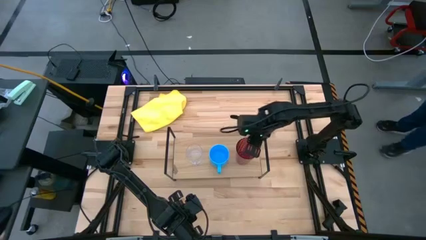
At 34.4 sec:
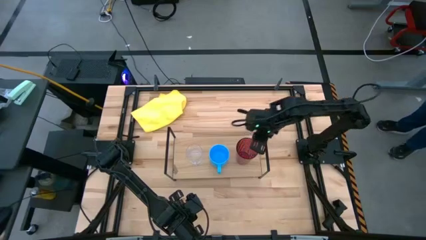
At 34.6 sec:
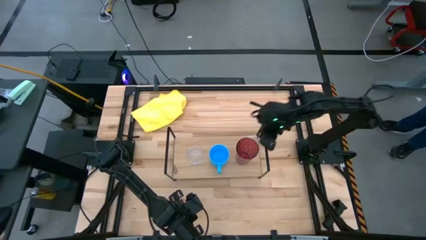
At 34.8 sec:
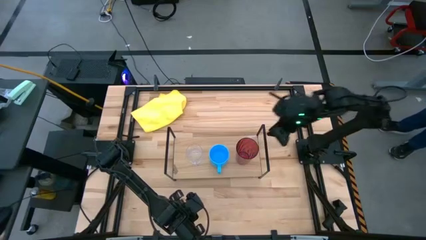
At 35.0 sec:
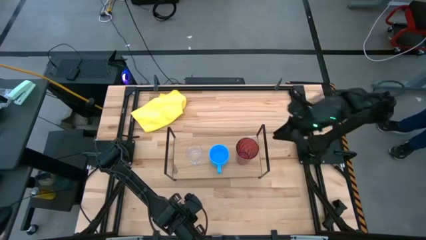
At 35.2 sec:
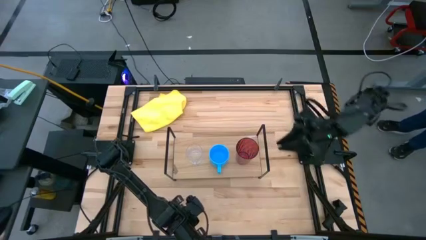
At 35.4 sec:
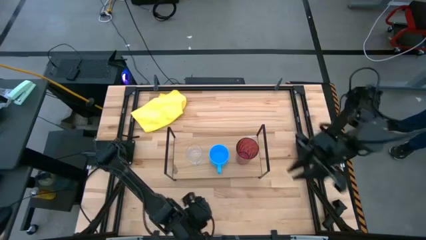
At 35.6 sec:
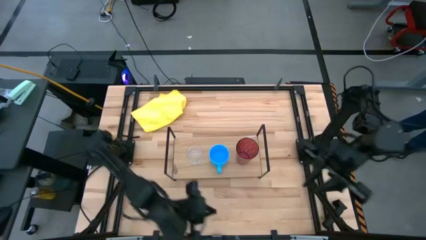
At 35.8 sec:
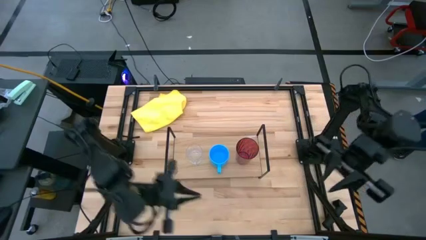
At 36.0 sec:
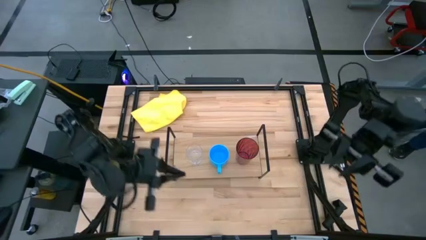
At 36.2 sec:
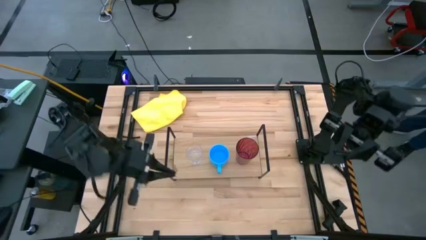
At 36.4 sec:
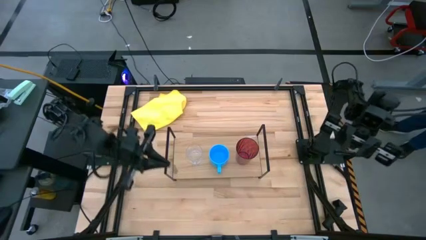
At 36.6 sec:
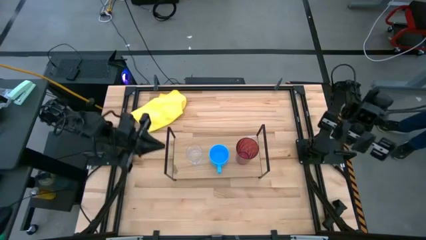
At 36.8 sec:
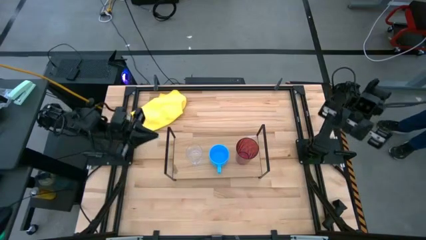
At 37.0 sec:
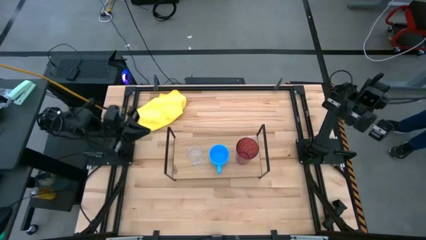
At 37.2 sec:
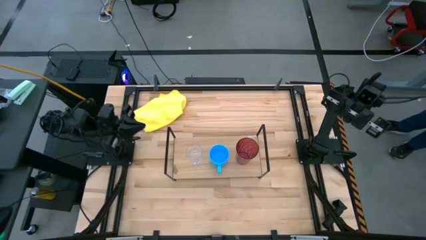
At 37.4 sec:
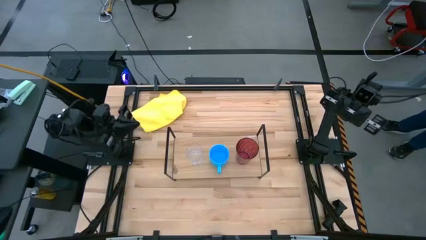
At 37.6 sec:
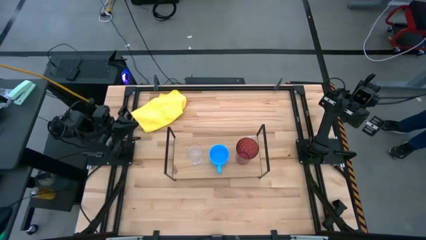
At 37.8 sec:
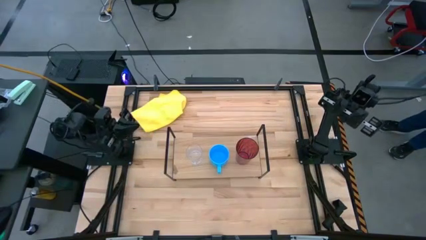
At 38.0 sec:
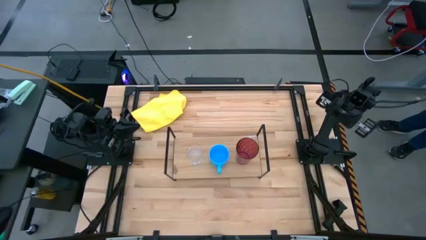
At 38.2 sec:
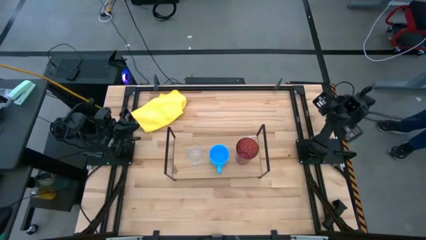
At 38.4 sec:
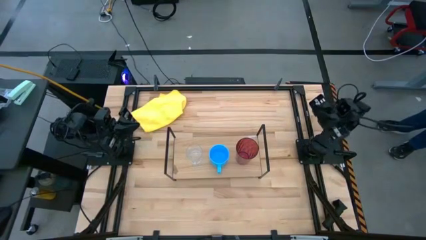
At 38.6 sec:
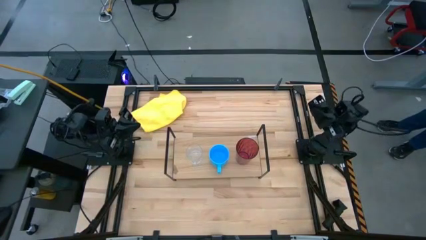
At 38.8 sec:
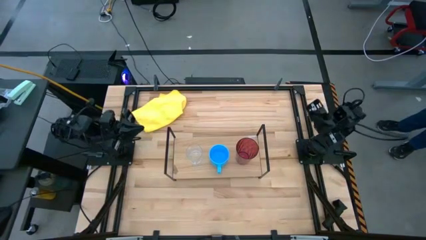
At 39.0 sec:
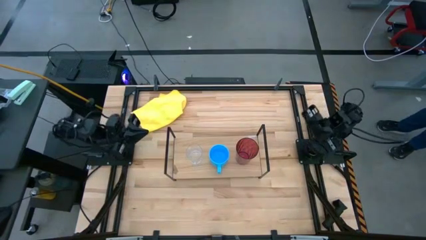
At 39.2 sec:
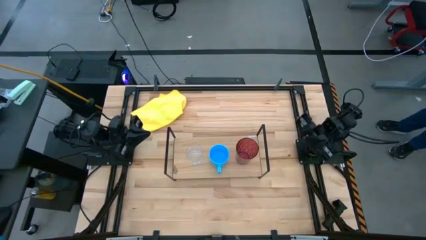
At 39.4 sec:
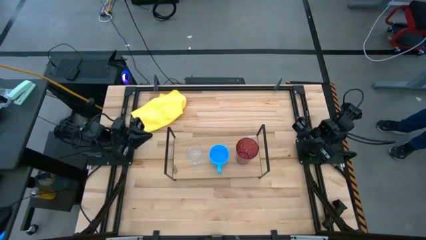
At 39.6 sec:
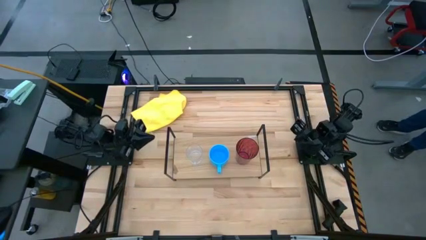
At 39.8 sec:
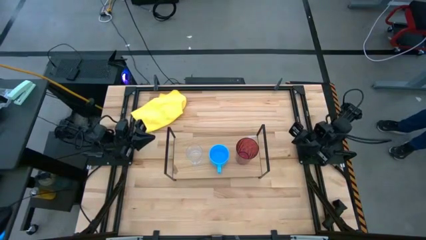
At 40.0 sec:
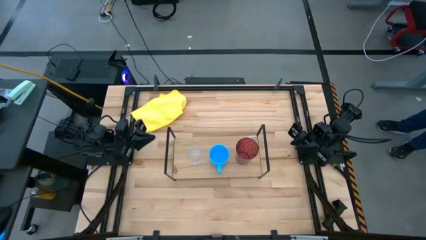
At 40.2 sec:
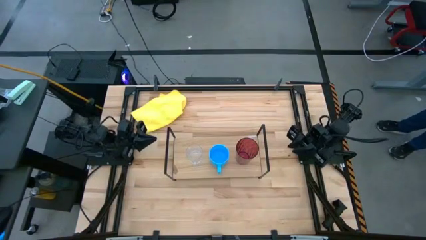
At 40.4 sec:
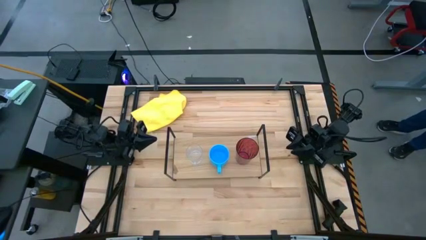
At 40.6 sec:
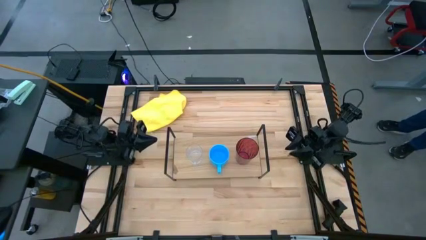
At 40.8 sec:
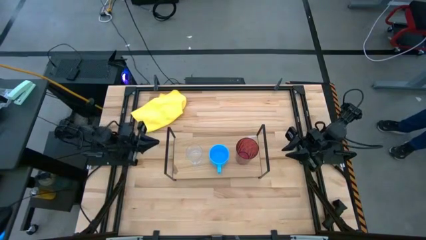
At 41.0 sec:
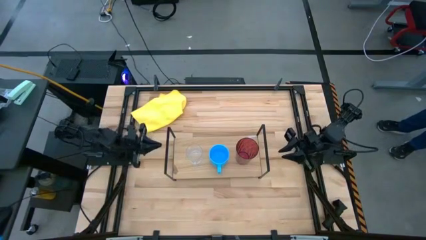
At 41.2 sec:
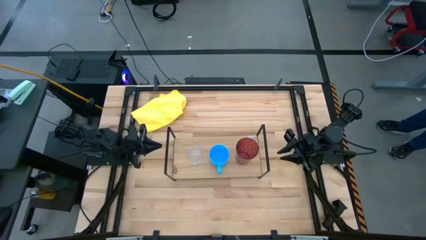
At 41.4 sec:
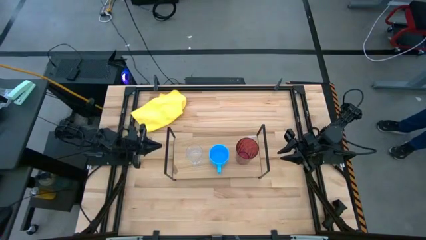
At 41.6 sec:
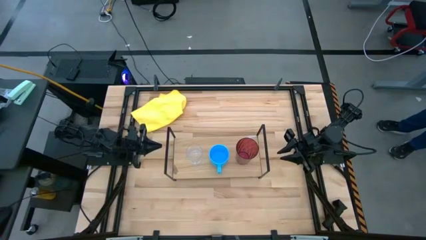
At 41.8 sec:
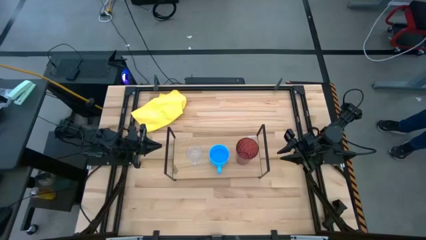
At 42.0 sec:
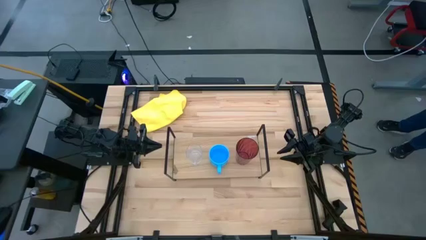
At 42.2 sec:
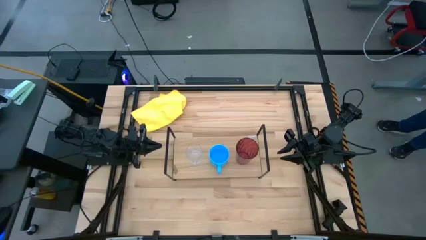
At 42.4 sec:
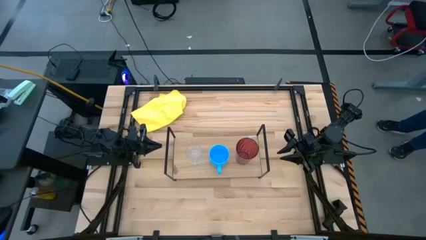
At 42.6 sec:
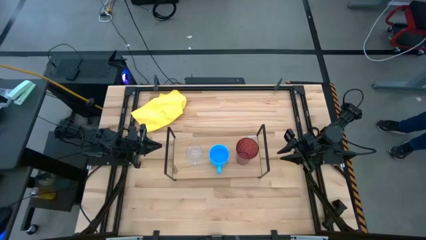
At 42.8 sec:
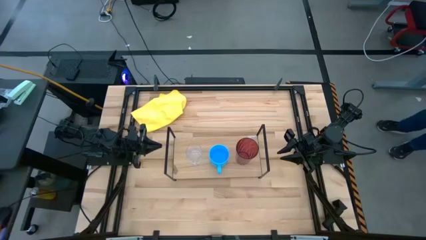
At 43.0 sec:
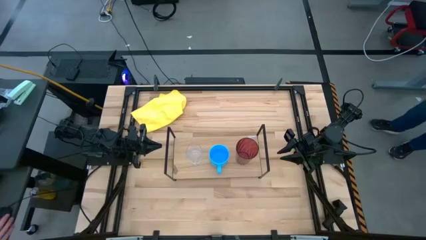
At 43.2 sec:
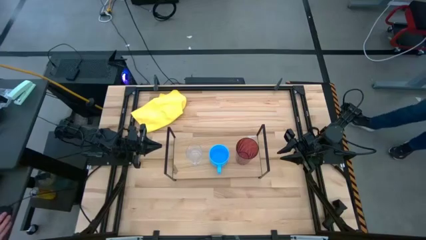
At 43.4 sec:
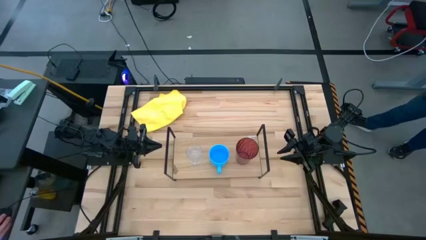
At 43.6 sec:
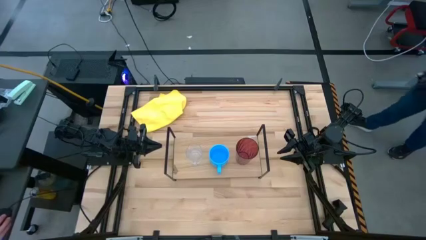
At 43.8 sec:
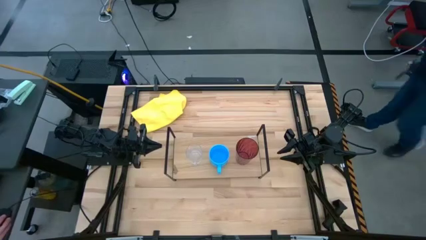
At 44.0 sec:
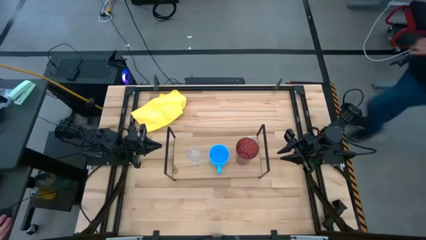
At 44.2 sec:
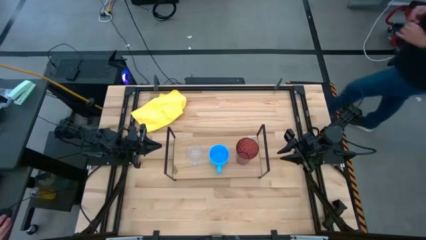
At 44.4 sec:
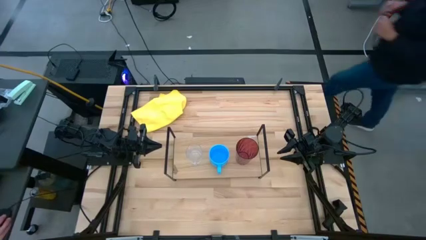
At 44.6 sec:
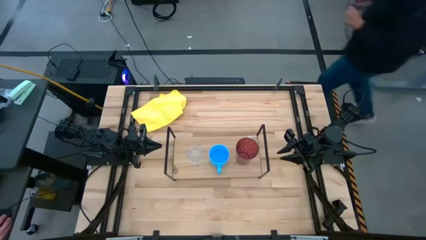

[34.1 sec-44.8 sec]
Task: Stack small to large cups/mugs on shelf
Return to Home Position

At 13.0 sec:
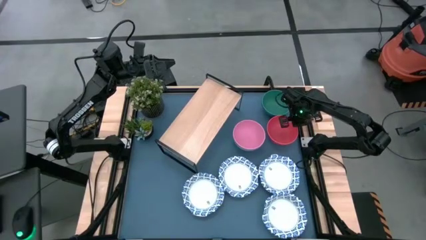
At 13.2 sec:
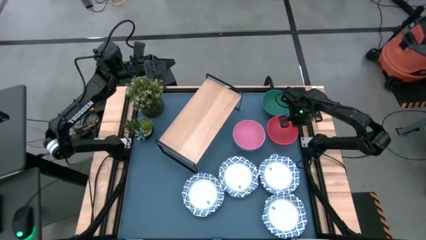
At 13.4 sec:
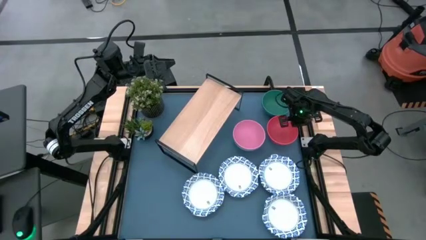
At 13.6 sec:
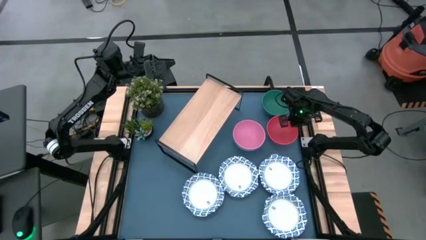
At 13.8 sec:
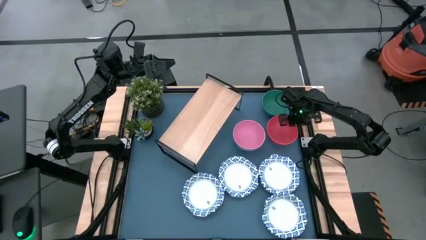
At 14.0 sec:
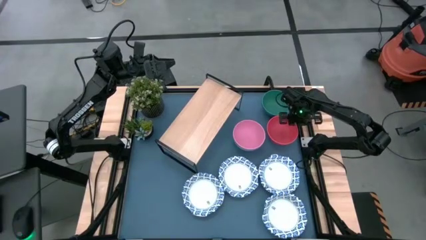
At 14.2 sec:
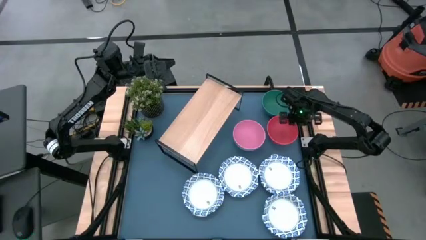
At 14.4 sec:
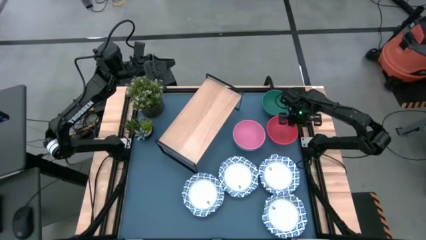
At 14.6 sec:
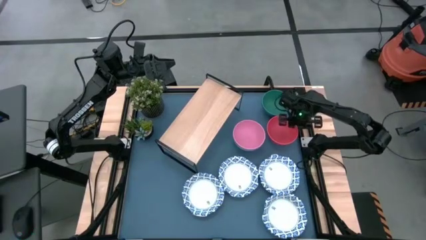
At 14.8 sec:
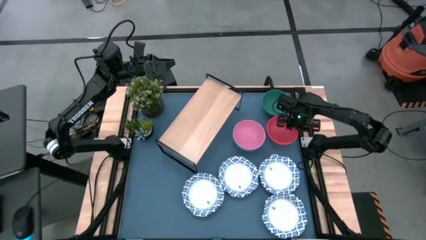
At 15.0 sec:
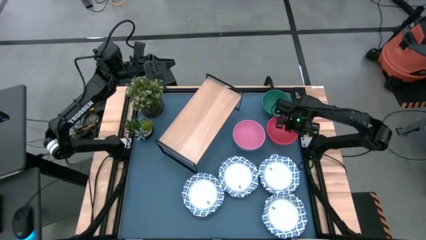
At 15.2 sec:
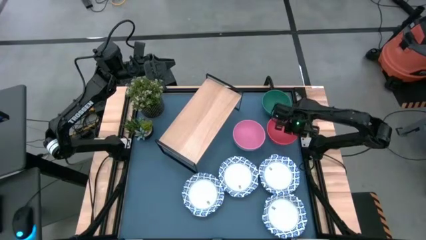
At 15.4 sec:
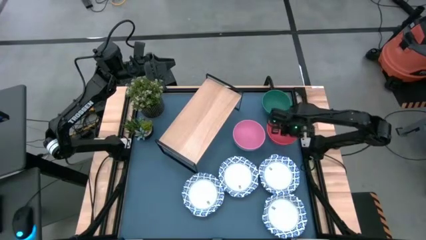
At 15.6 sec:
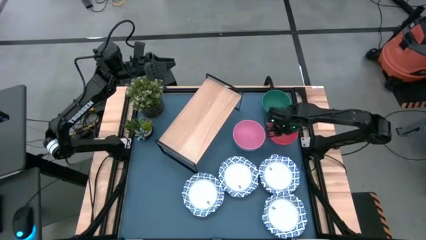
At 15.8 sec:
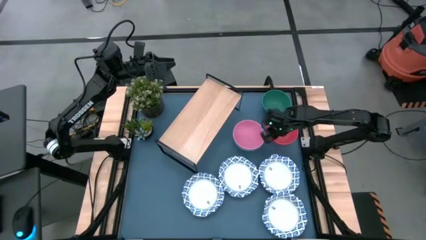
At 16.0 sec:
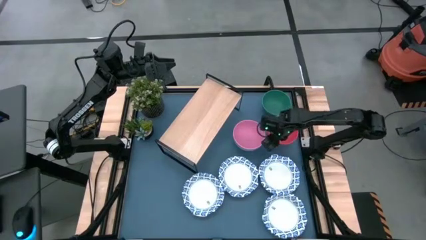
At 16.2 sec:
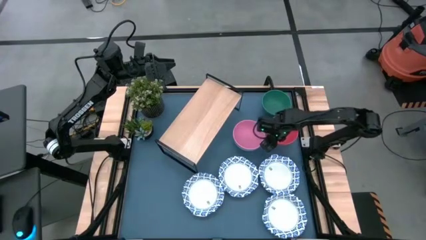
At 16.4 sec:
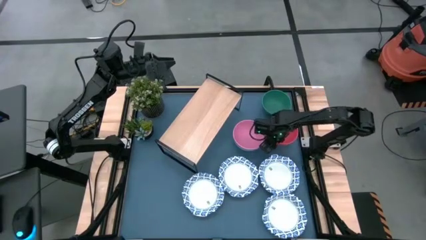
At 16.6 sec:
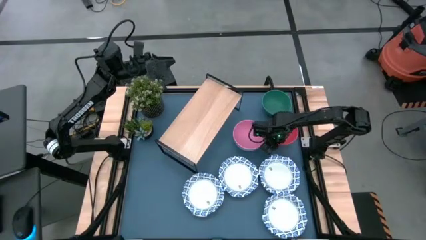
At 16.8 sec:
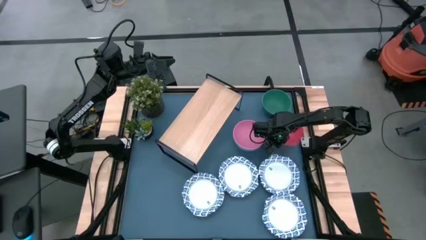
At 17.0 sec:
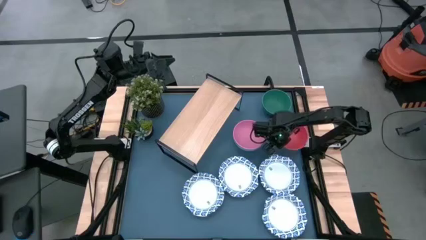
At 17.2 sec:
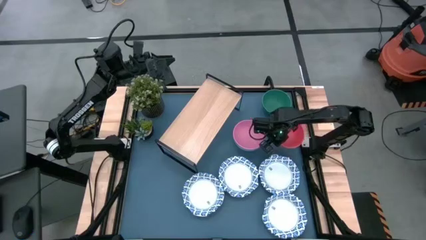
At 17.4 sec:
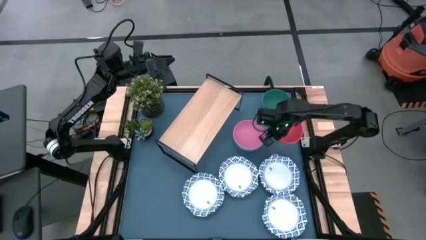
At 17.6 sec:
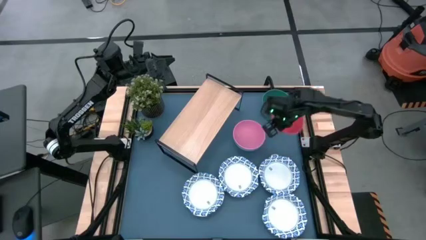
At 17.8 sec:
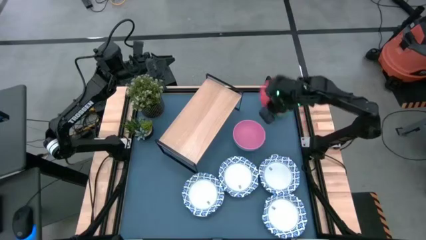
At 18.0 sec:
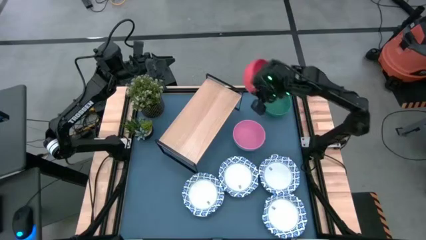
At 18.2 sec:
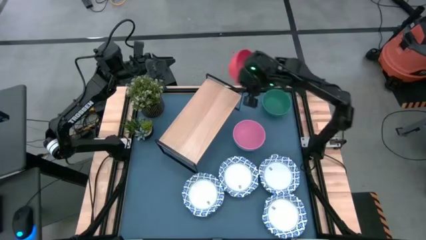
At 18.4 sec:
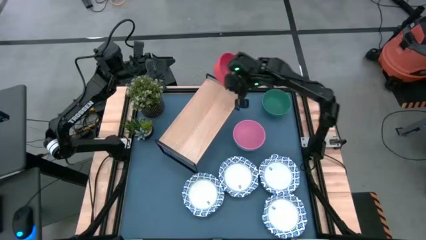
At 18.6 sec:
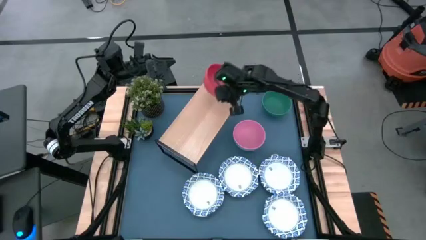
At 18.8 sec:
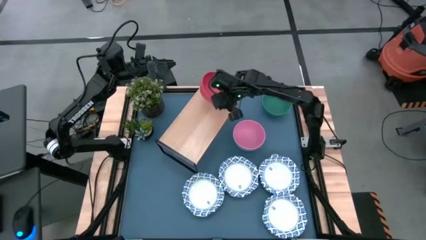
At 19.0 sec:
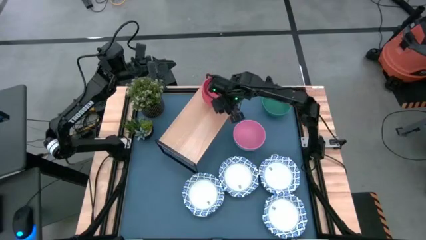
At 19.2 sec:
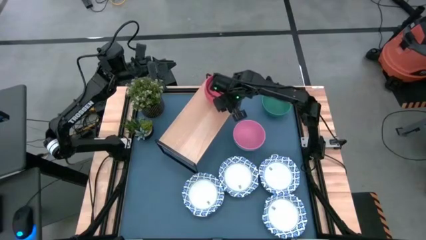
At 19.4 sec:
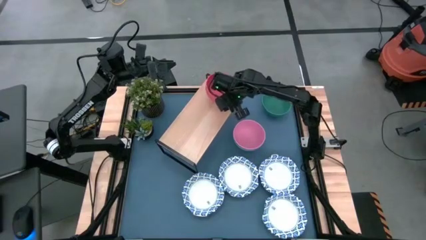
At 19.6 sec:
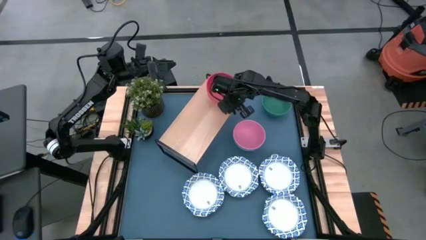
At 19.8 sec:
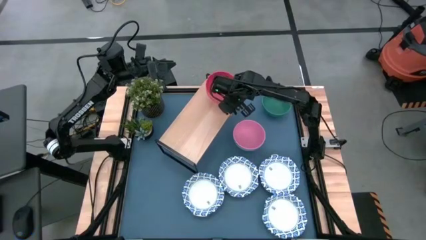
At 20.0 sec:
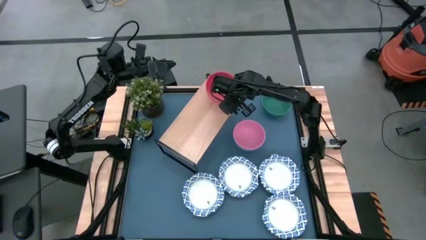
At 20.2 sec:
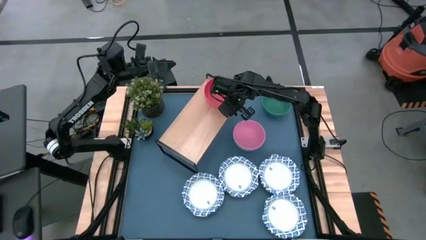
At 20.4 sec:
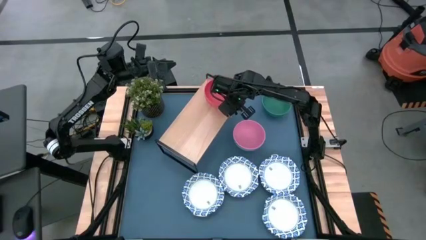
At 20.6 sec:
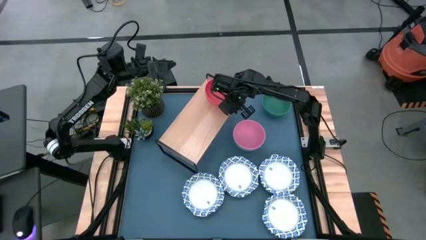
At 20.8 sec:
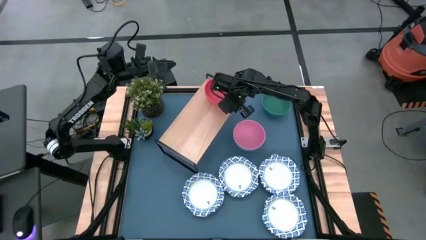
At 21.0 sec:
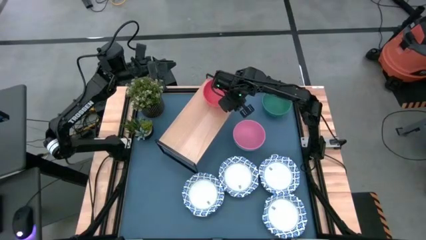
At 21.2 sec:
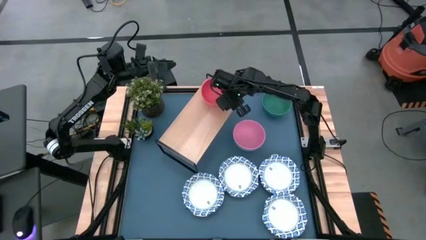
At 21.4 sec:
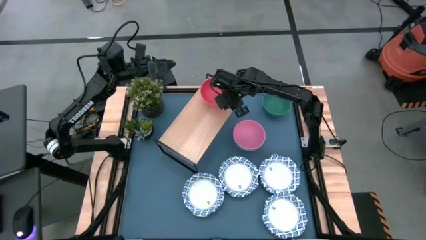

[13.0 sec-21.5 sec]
Task: Place and stack bowls onto a shelf
Put the orange bowl on the shelf
